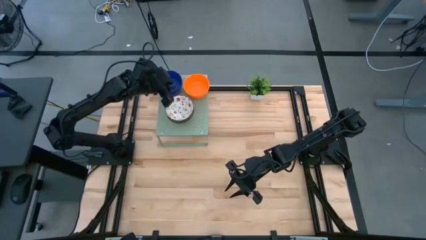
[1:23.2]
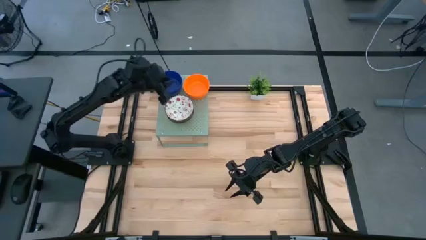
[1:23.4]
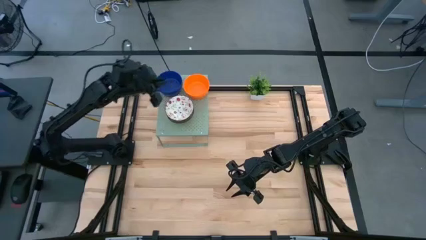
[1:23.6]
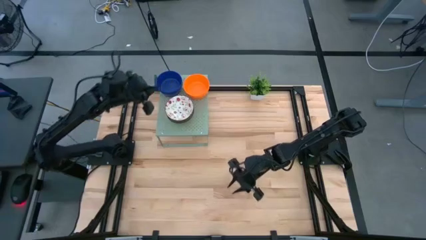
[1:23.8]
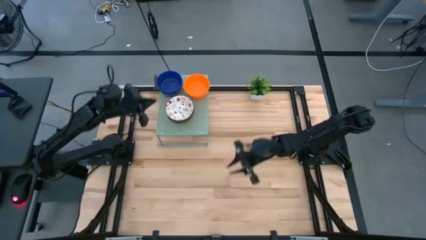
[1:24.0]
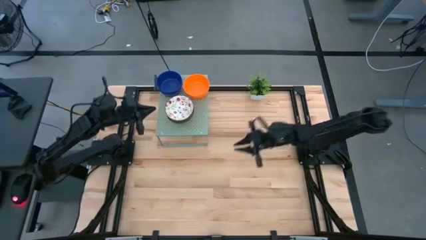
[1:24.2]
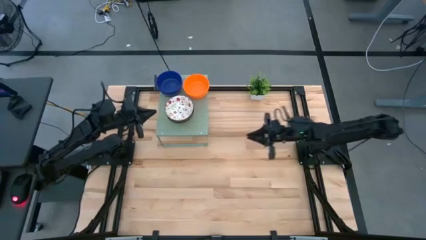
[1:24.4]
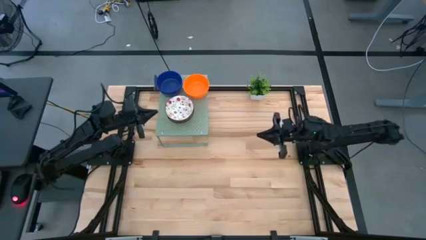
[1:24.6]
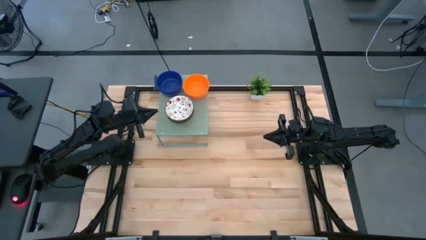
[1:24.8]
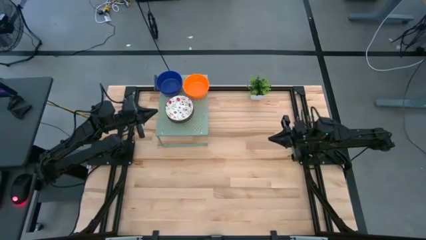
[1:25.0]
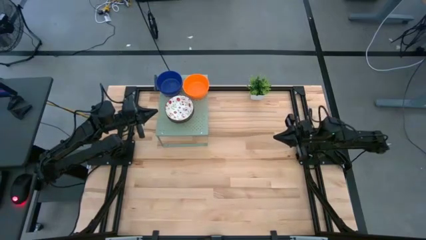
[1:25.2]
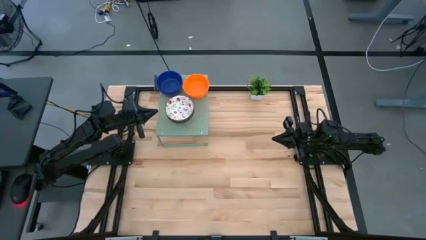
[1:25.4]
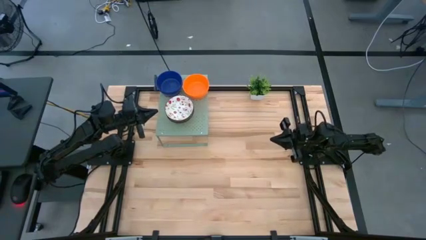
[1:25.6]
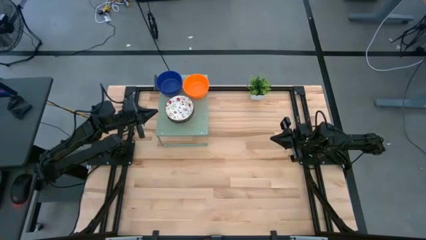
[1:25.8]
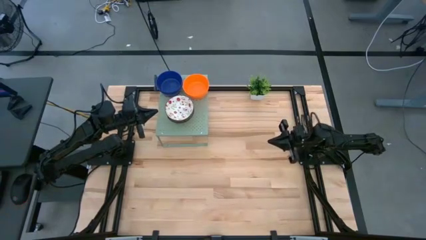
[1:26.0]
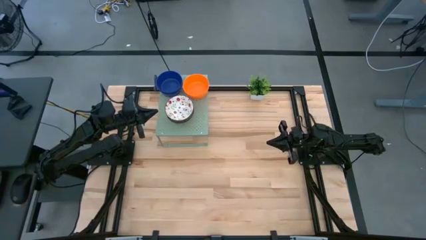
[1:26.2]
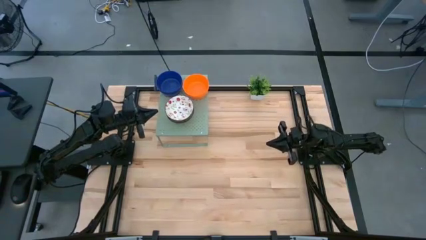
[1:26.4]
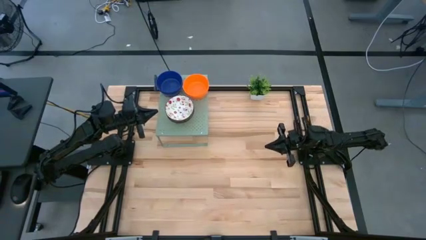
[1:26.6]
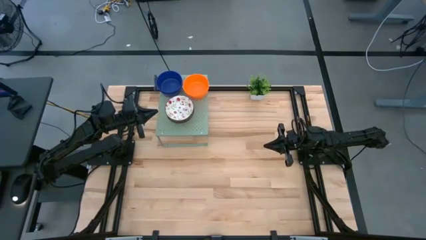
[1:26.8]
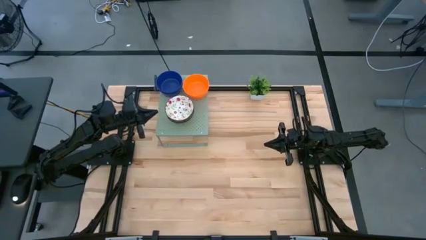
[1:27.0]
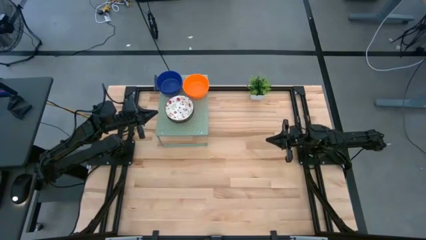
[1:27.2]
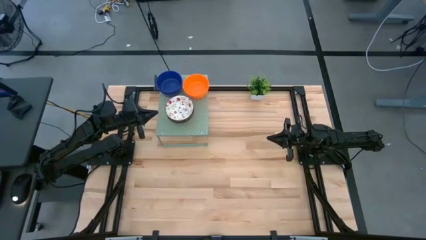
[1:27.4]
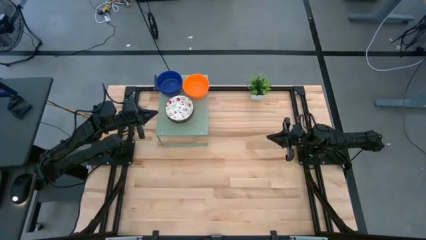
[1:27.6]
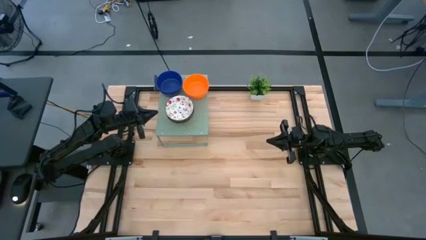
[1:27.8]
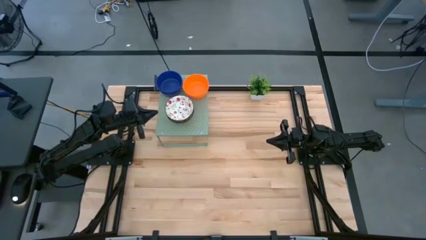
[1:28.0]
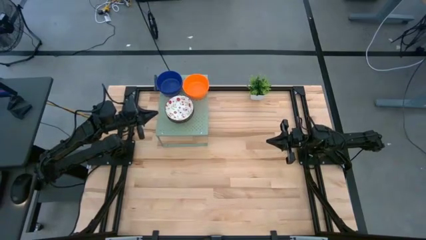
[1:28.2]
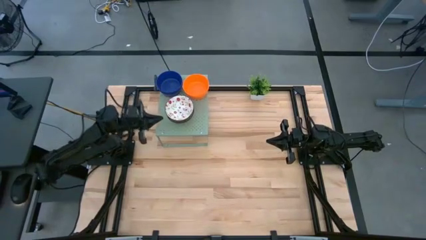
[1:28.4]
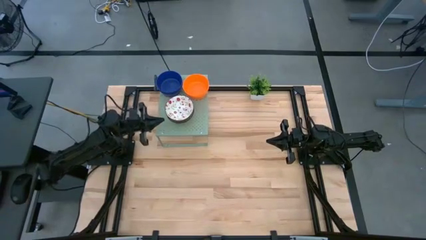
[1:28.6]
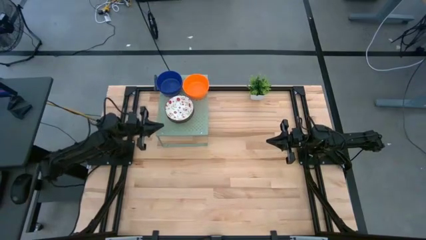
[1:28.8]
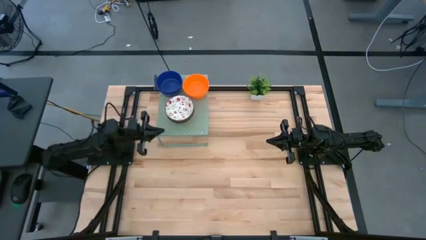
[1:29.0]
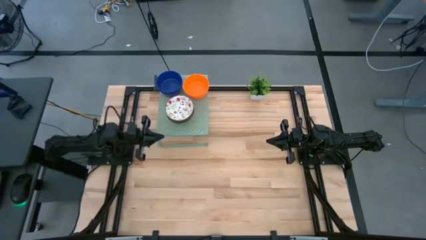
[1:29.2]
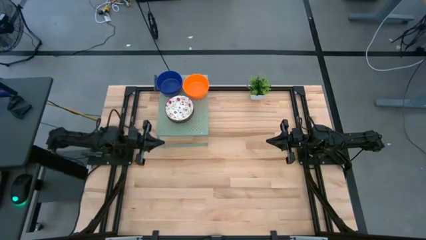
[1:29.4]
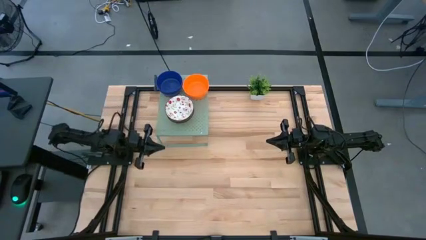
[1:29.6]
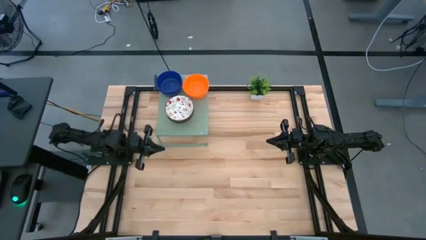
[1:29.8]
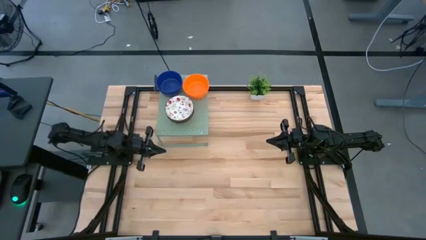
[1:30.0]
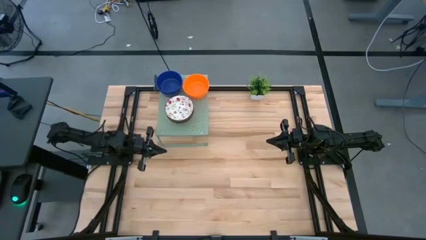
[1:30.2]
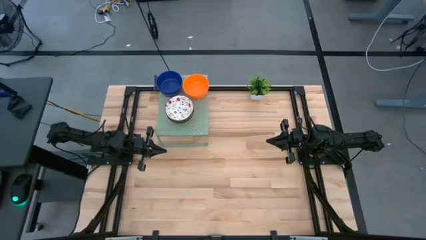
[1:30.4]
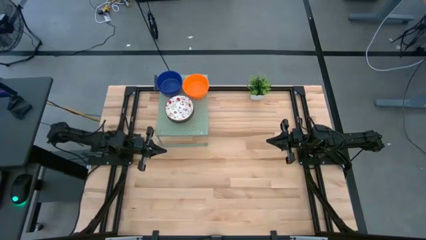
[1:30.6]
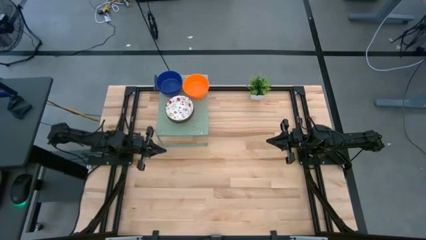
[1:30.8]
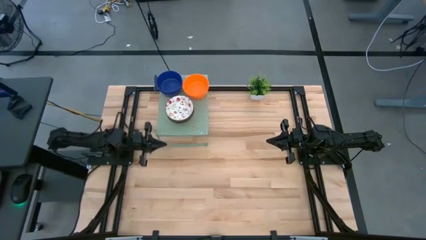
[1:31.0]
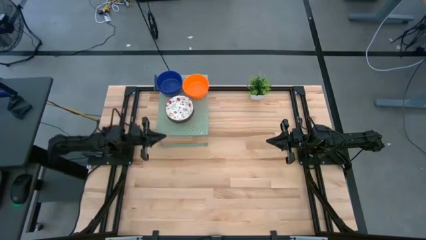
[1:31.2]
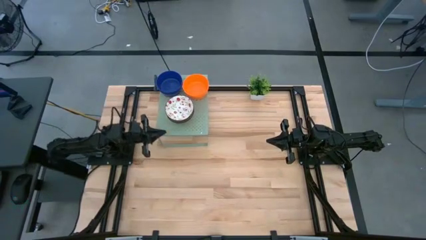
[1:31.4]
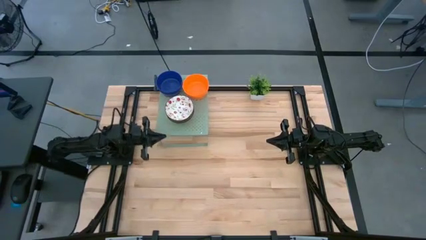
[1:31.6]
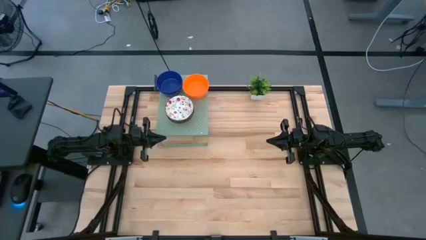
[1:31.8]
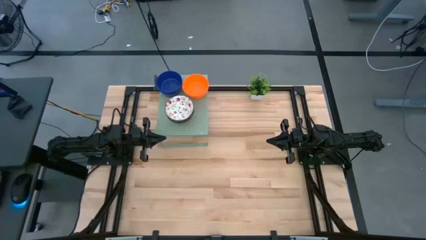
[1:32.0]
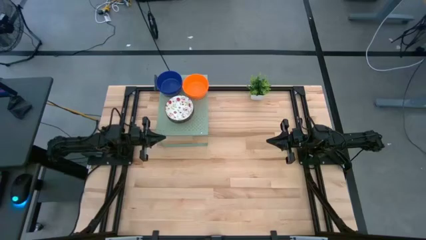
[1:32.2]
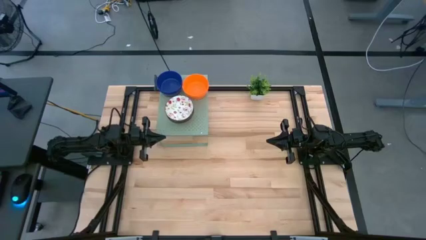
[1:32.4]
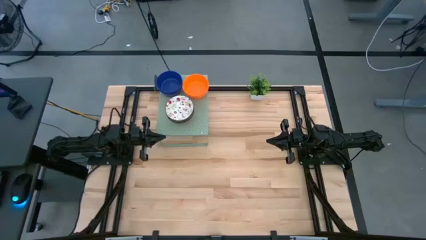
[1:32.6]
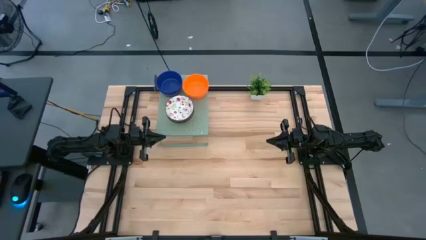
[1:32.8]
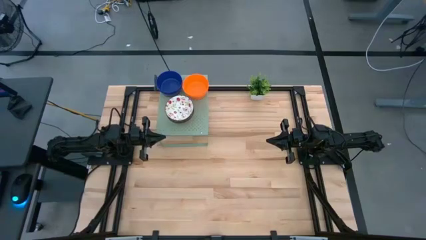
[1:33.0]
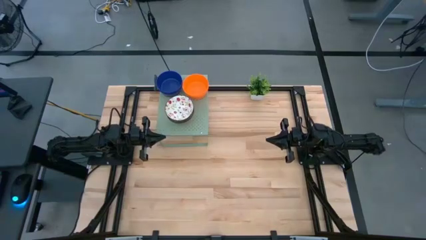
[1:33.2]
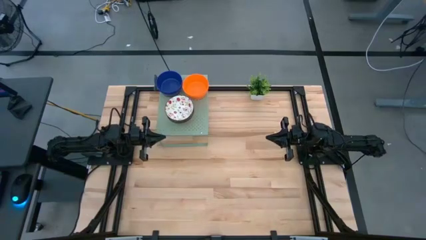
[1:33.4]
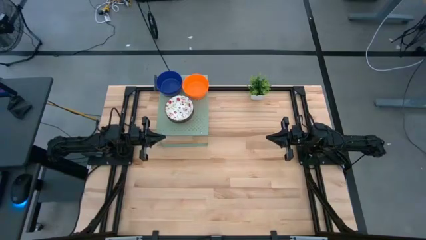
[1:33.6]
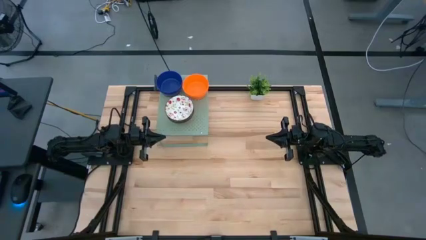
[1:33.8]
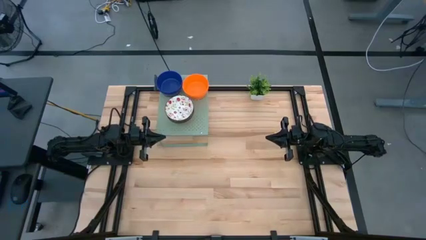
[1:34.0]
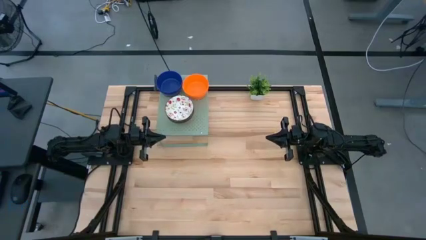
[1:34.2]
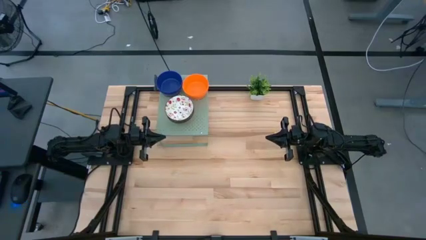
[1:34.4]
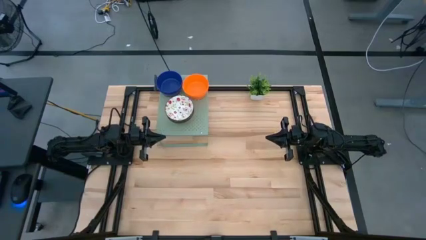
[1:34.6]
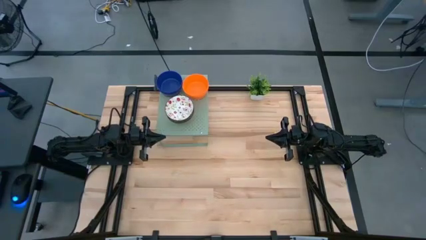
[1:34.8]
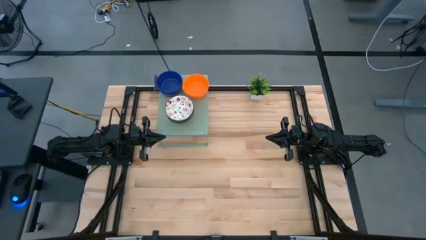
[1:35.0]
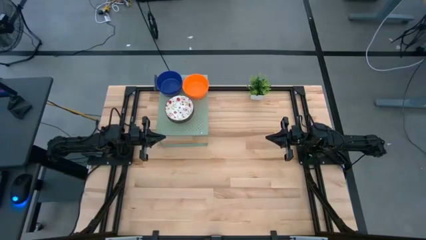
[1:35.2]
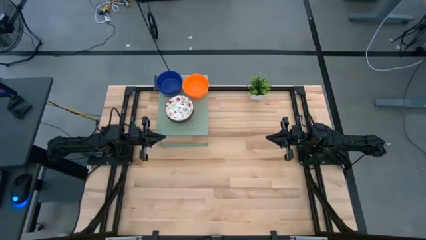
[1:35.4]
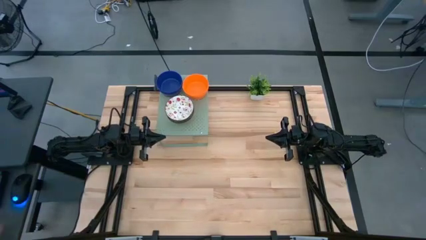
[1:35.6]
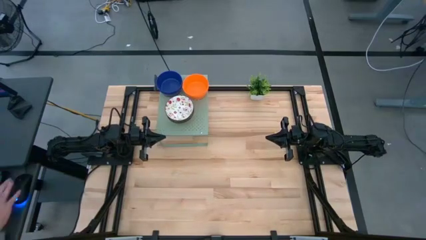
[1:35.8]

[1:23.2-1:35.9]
Task: Pick & Place Mini bowls
Return to Home Position

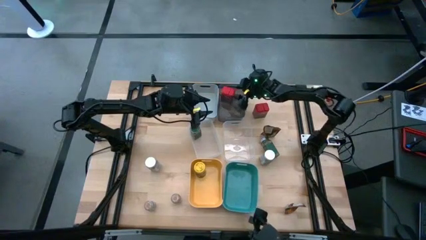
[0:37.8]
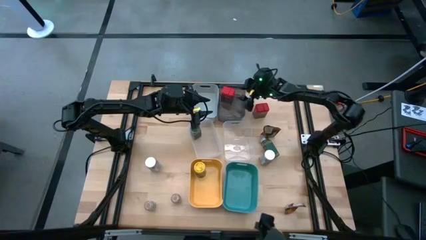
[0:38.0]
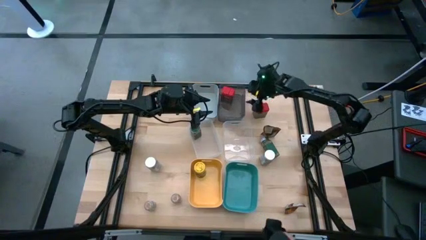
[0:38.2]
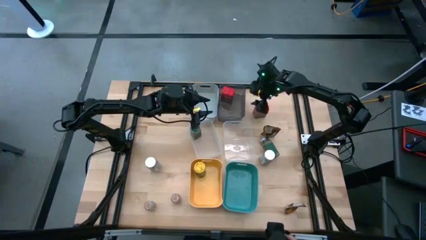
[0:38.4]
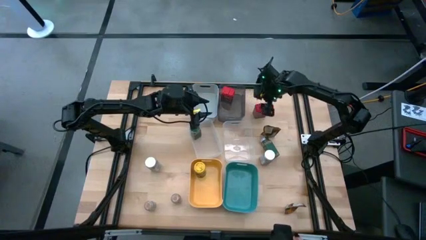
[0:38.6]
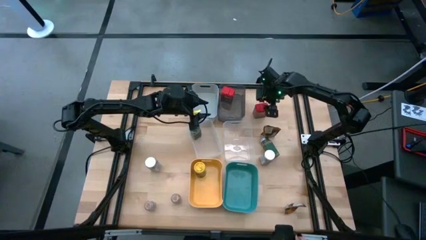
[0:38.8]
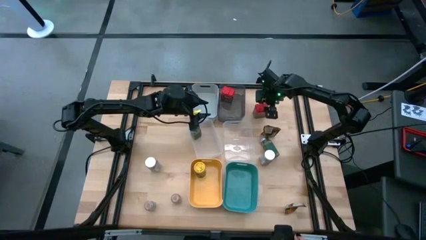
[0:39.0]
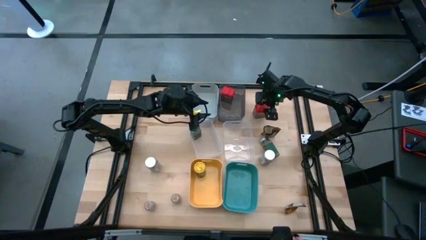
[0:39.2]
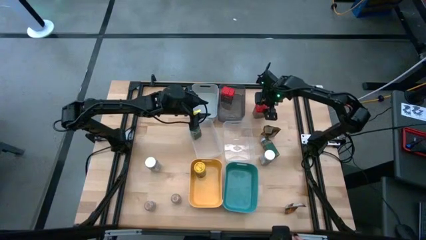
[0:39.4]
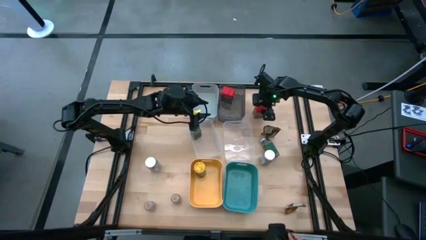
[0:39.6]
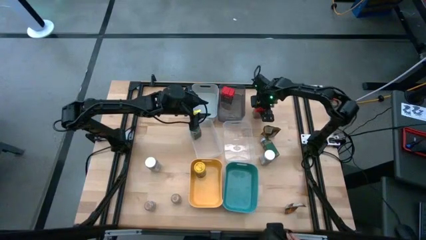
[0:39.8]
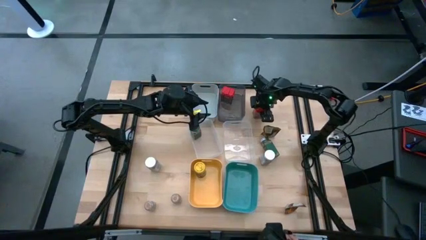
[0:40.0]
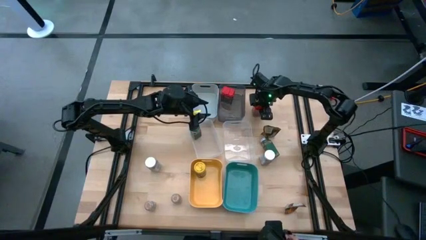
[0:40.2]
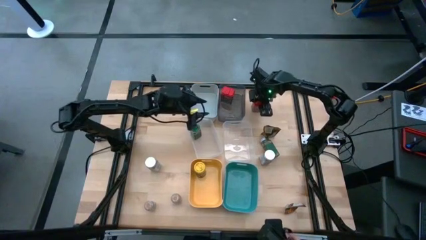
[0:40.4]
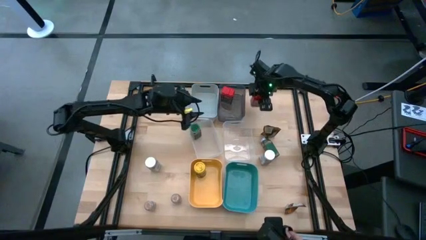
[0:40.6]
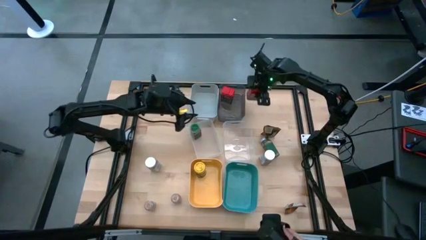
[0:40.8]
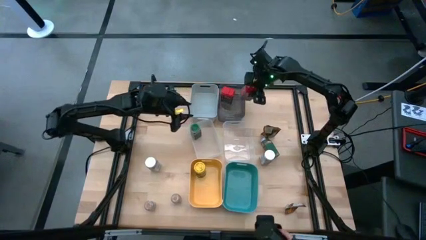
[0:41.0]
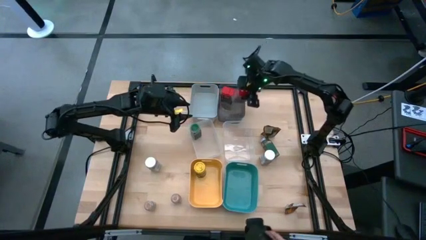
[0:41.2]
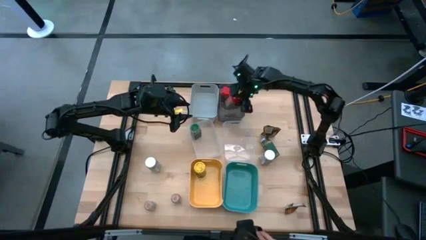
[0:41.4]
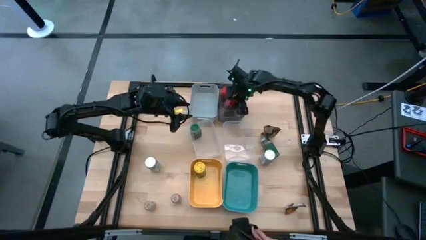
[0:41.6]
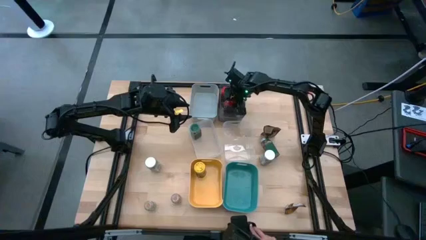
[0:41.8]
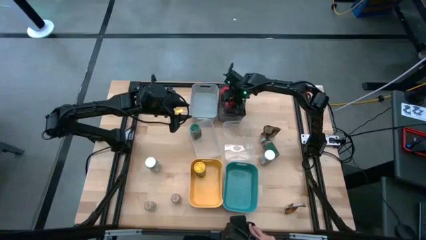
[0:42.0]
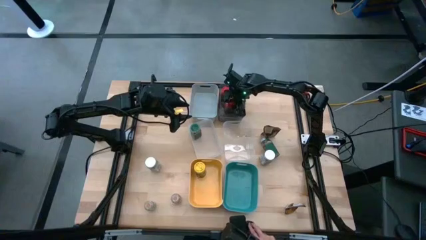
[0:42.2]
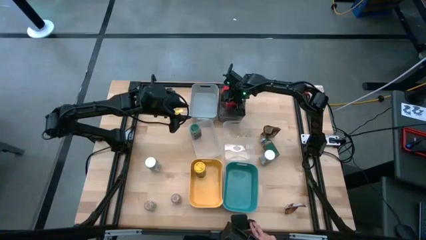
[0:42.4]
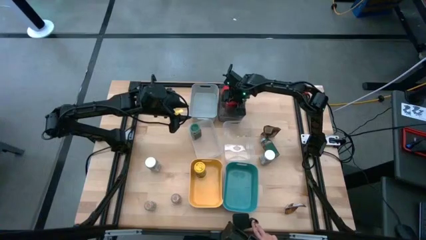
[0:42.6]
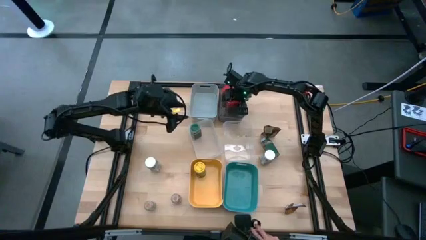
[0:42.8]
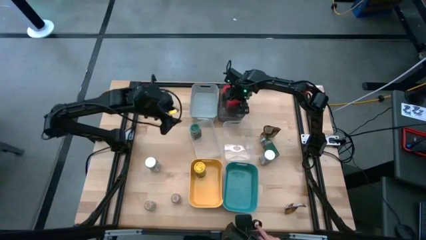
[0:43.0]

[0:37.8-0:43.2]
Task: Sort spices by type
Put the red seasoning can into the black bin
